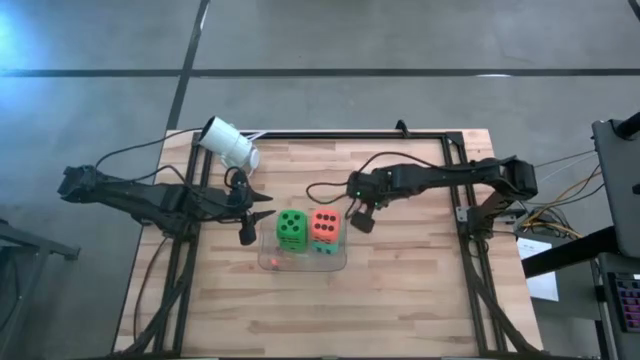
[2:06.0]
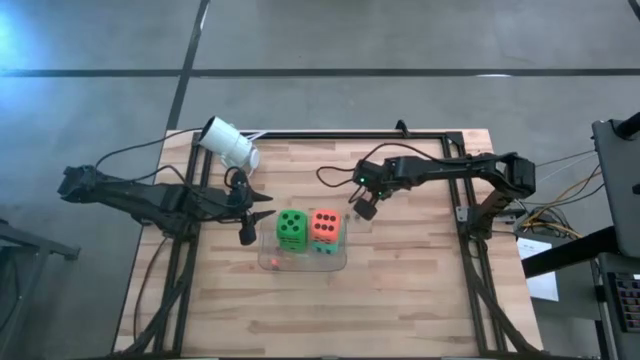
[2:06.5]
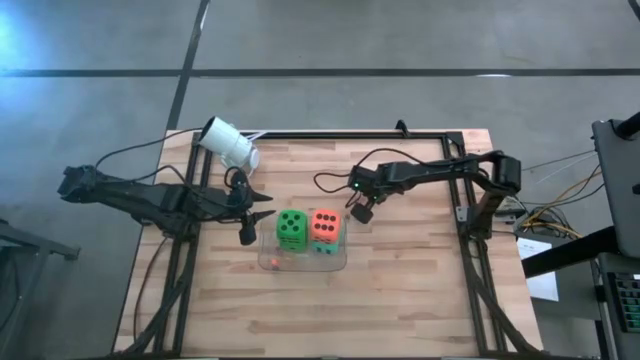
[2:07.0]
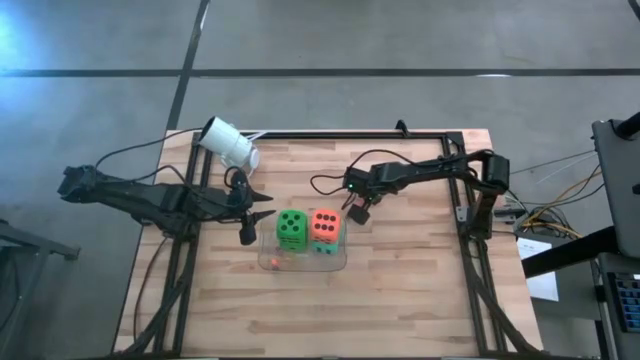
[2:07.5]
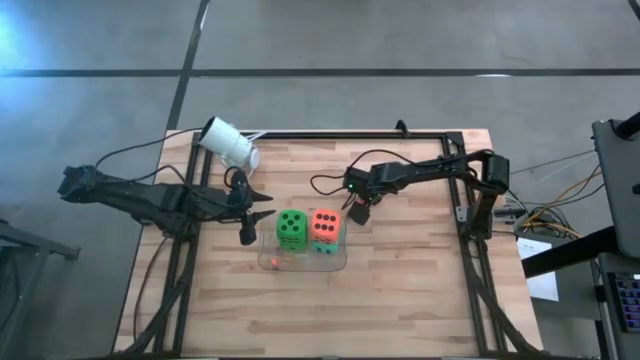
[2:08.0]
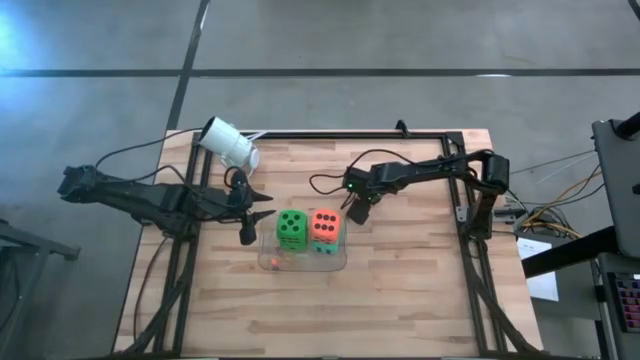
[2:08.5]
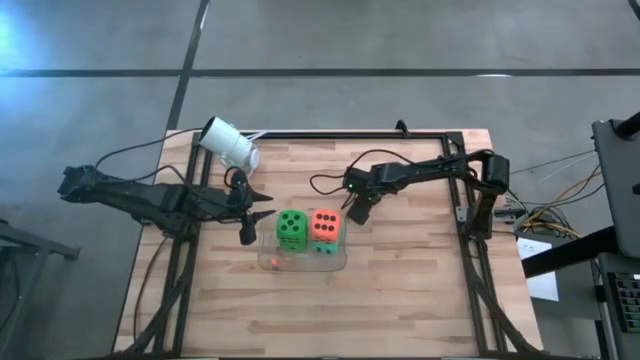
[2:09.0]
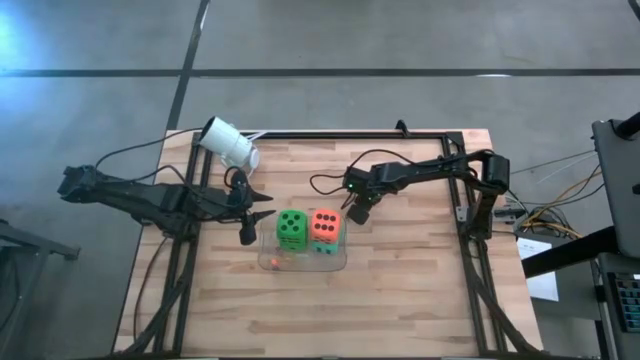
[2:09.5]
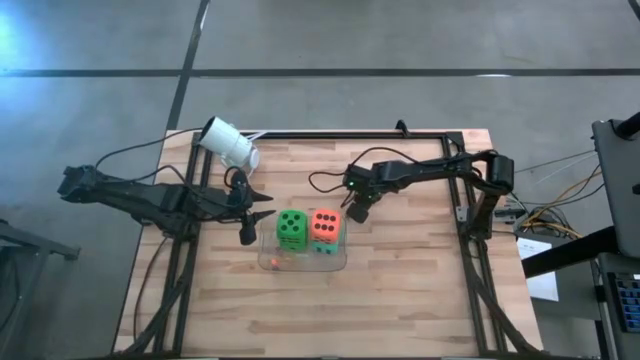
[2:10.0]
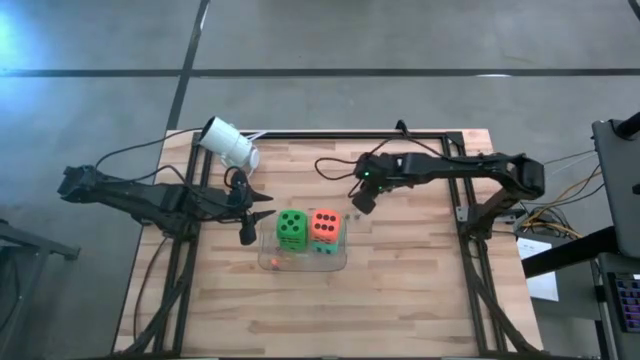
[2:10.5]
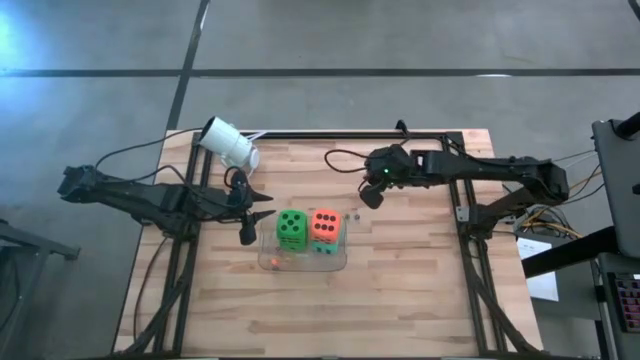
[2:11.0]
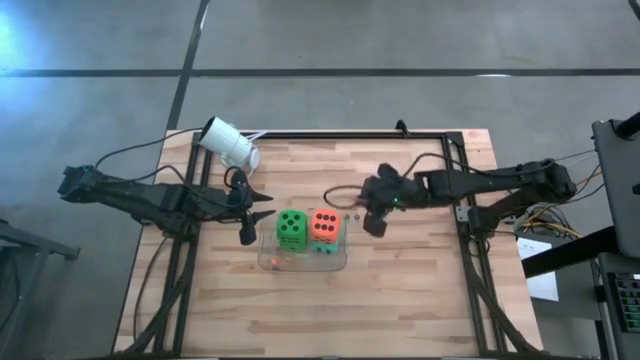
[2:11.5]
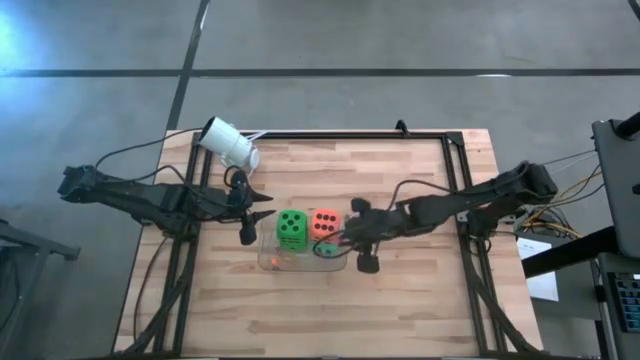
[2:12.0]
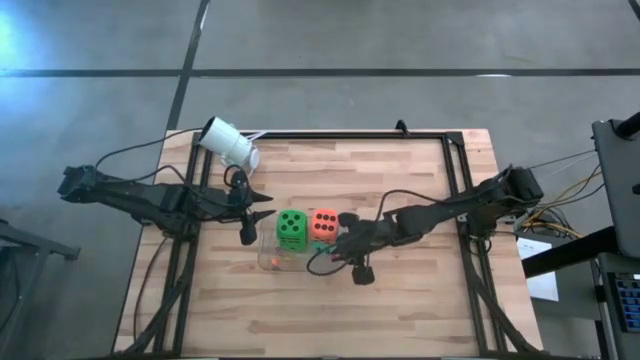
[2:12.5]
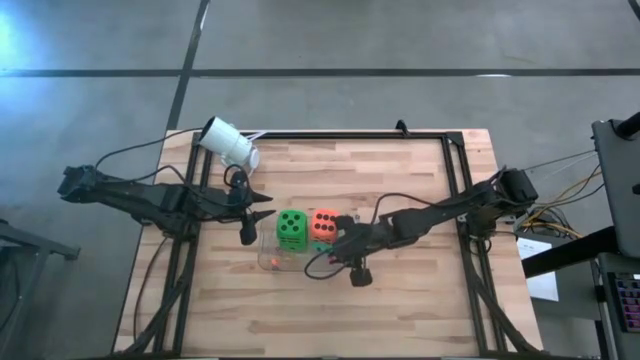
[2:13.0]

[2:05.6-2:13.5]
Task: Pick & Place Dice
Put the small pink die into the transparent bin

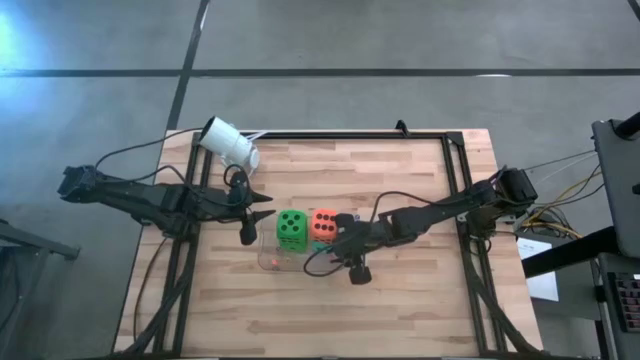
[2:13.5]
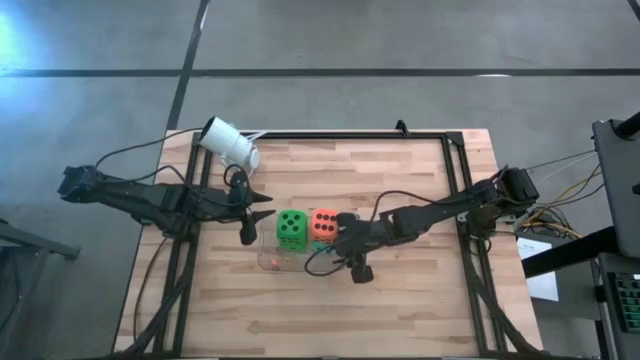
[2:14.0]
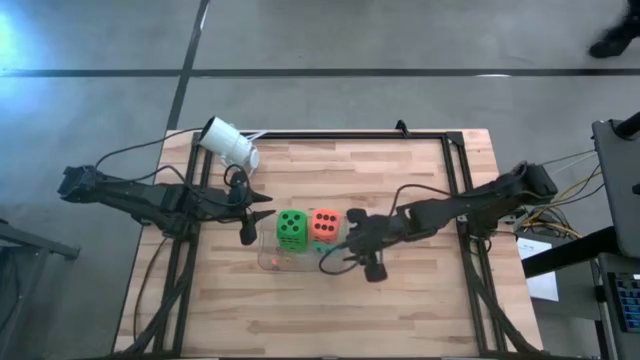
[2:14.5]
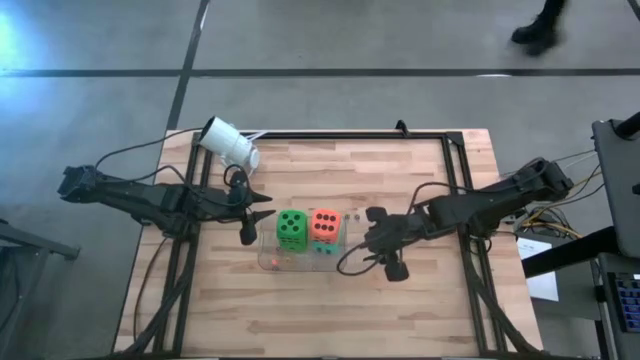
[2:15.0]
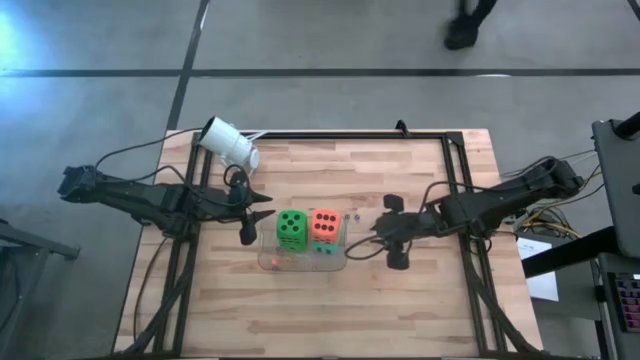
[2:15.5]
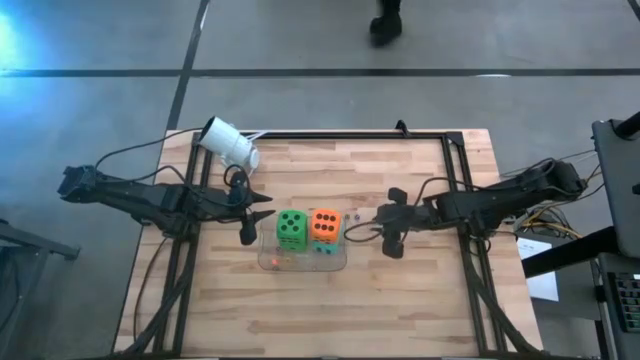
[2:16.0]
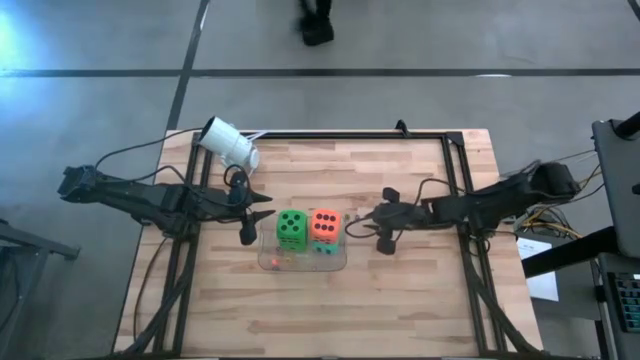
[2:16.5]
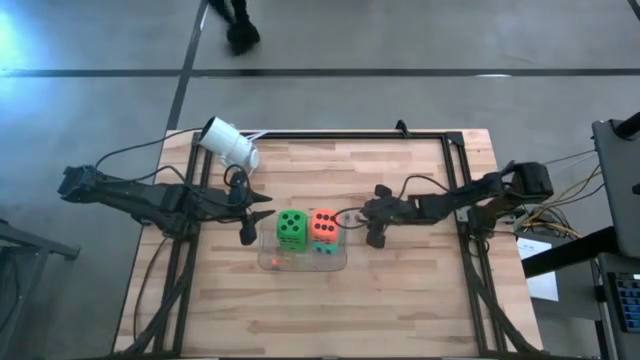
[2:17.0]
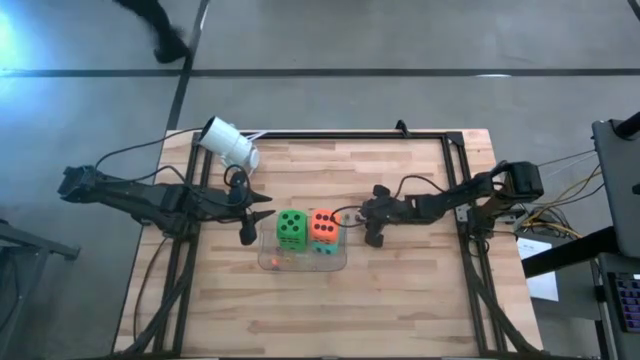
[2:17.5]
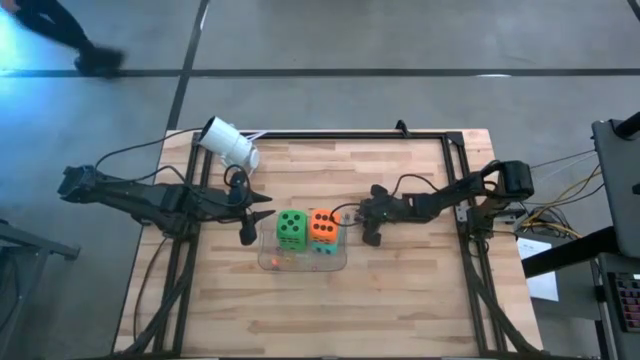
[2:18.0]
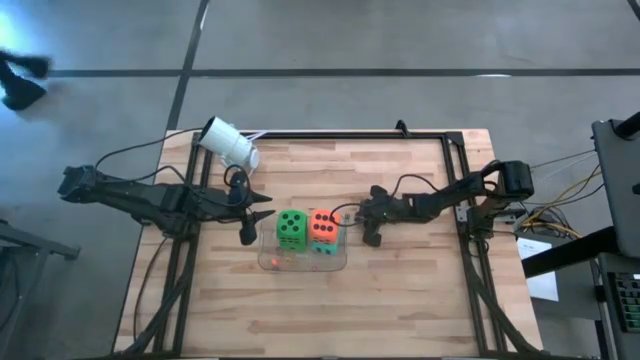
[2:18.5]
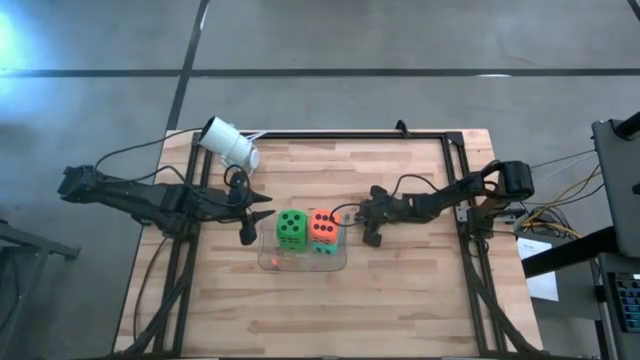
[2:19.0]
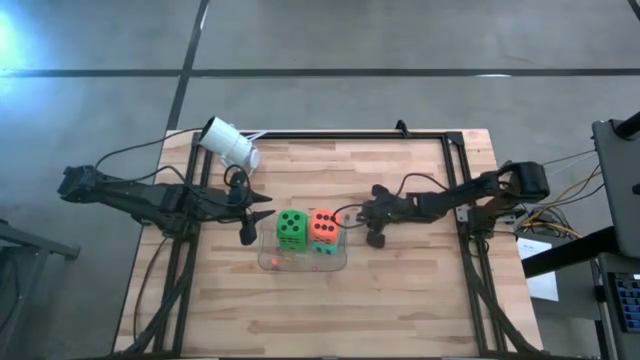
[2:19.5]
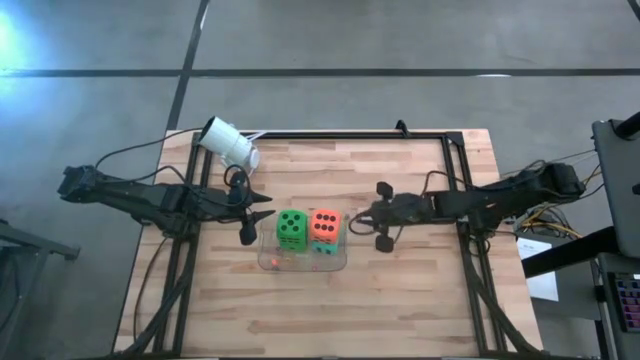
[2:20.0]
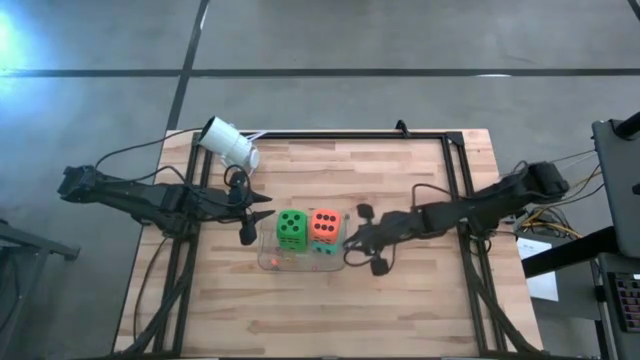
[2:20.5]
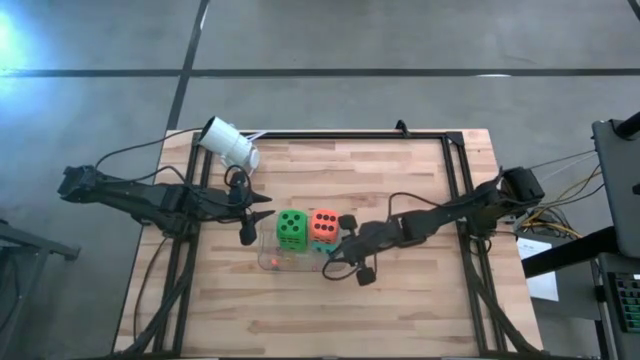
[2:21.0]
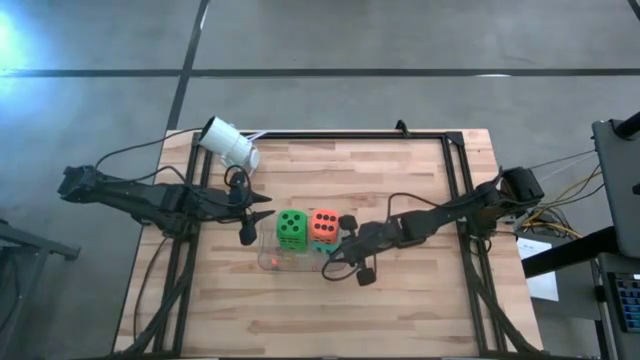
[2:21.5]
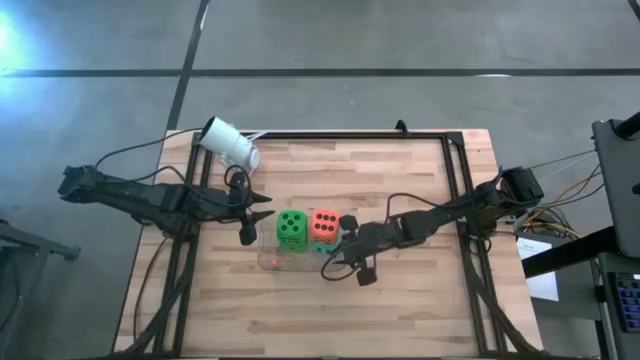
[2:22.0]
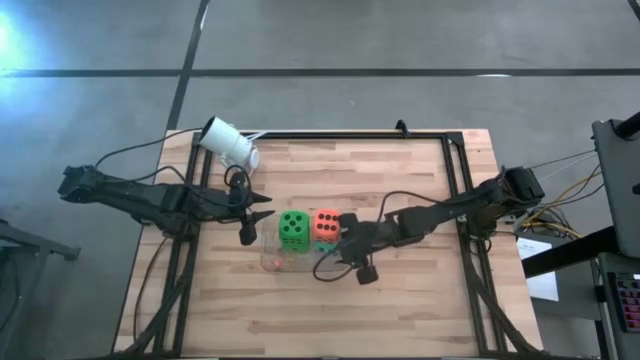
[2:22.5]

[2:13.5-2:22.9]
Put the small blue die into the transparent bin

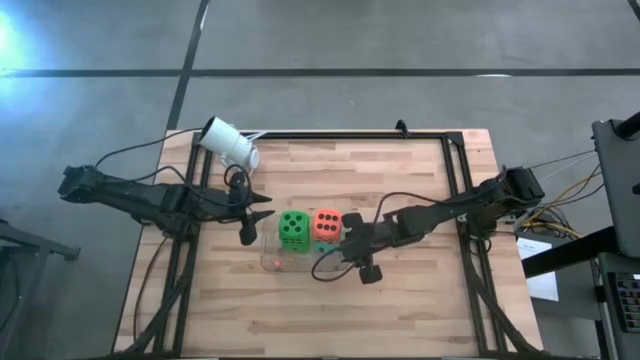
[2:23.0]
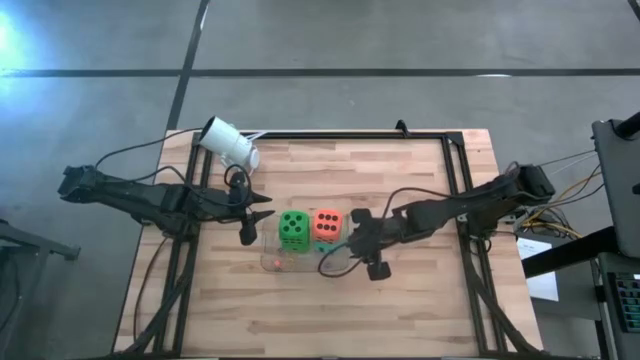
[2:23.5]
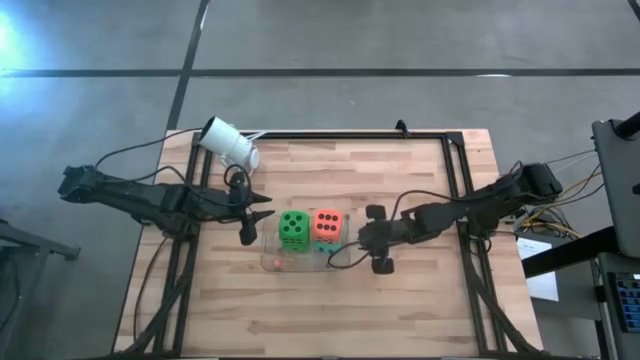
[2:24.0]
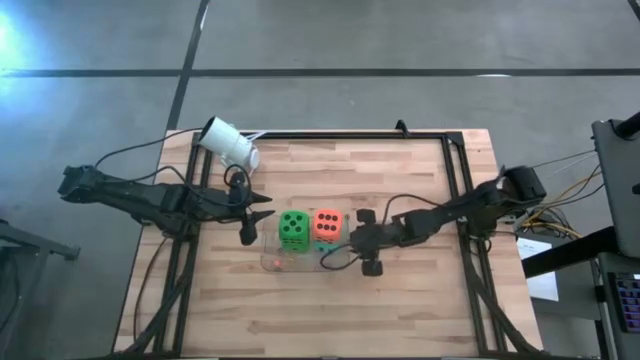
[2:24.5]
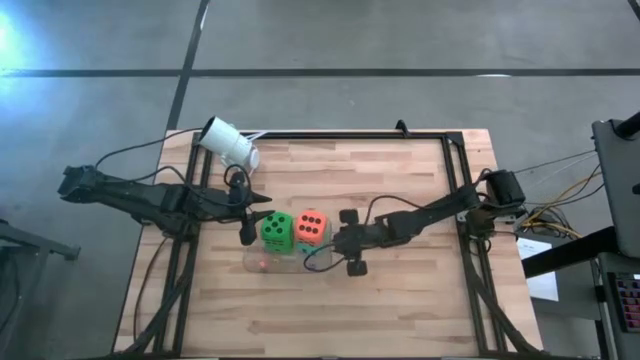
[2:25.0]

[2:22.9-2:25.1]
Adjust the transparent bin

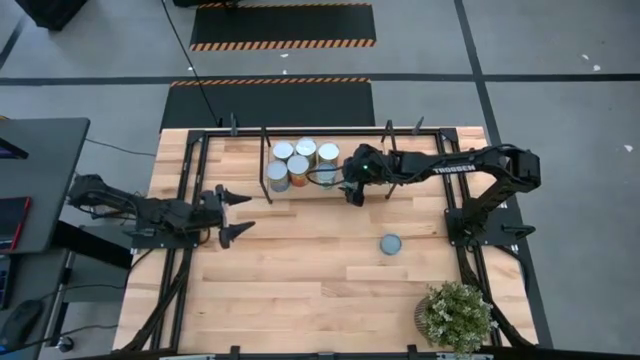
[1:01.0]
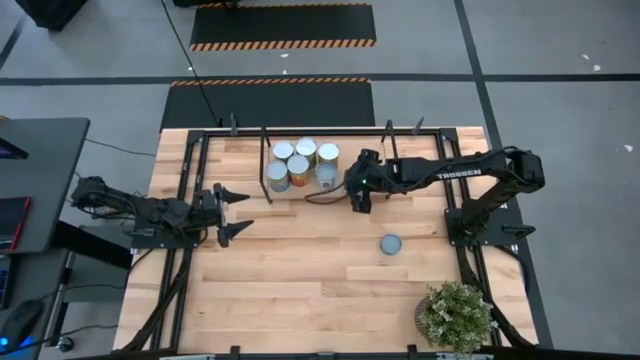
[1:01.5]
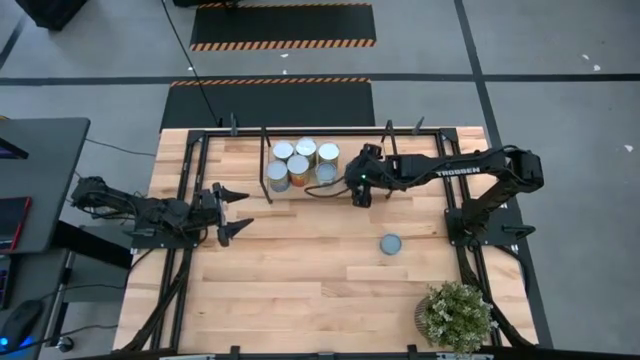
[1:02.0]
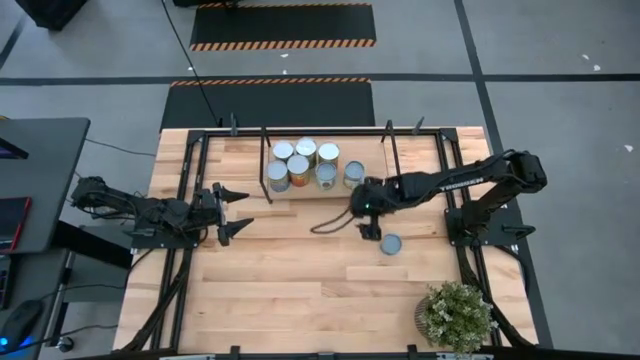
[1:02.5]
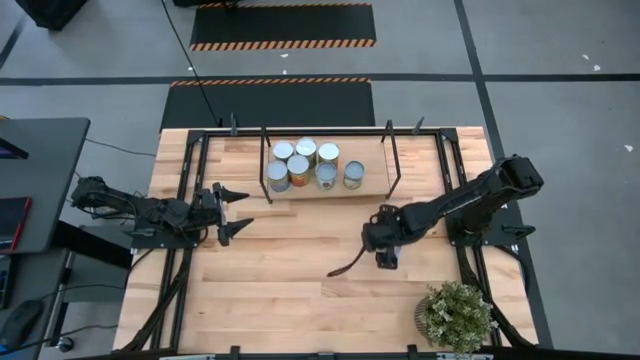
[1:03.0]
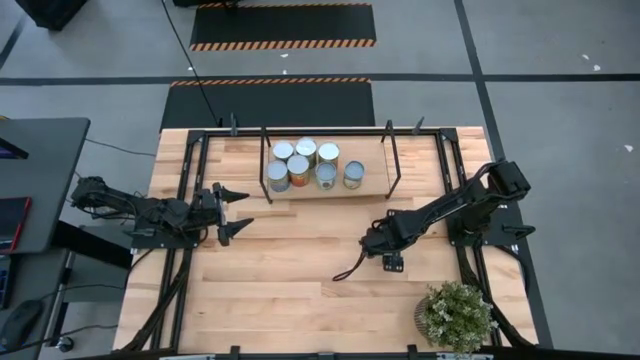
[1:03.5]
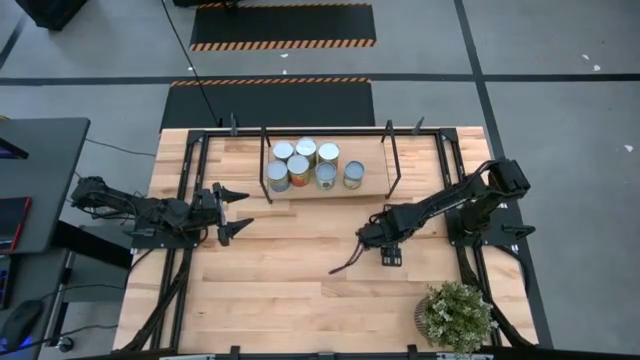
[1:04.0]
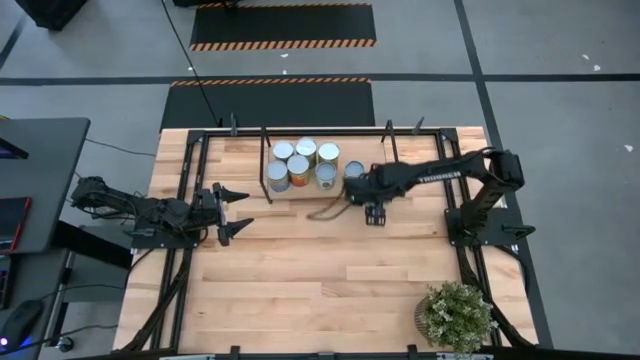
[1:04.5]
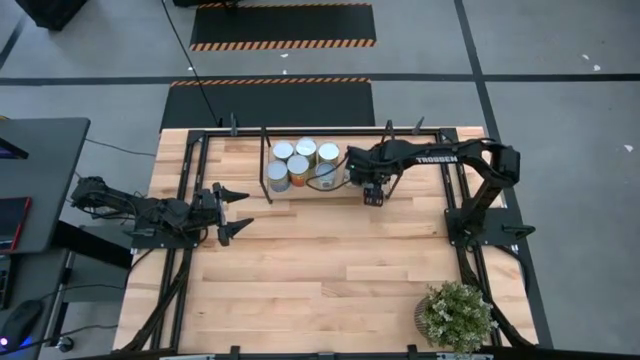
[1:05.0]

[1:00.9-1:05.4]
Task: Pick and place cans onto a shelf
Put the canned tuna on the shelf
